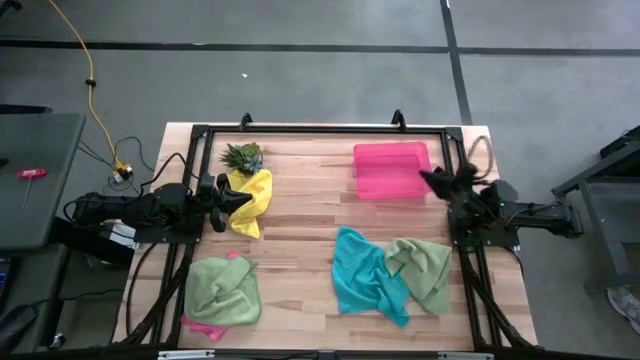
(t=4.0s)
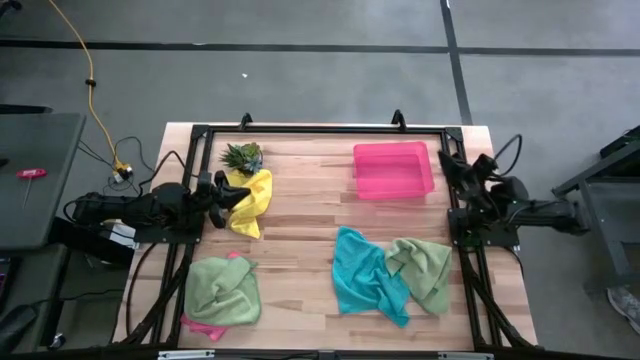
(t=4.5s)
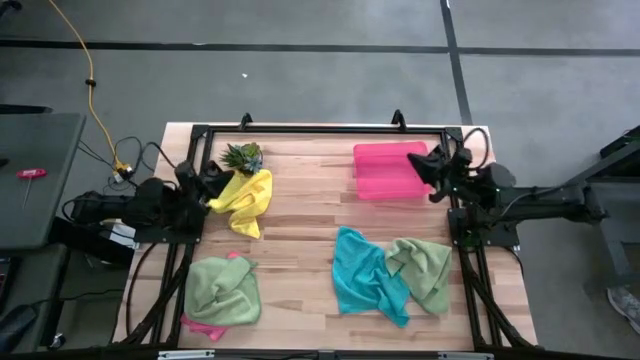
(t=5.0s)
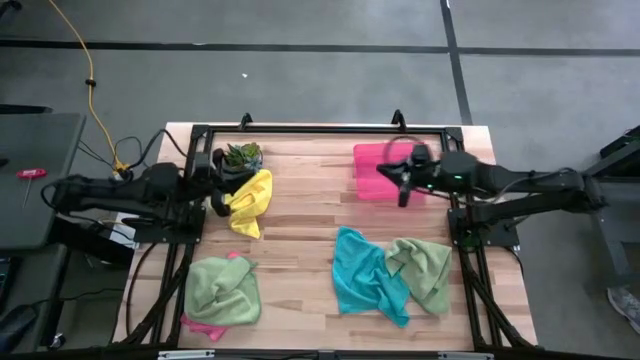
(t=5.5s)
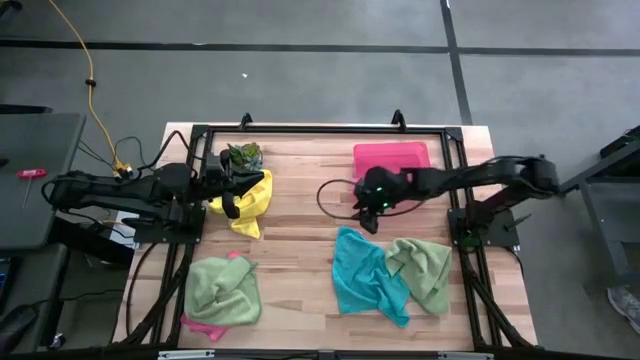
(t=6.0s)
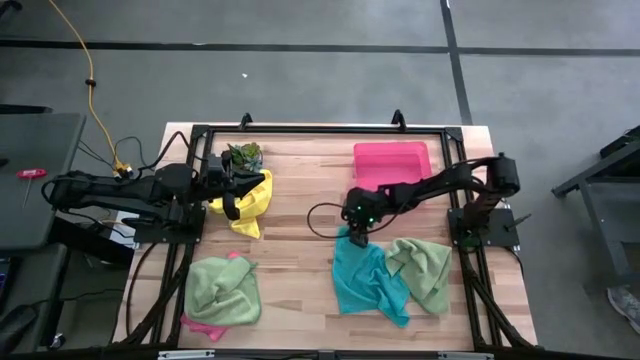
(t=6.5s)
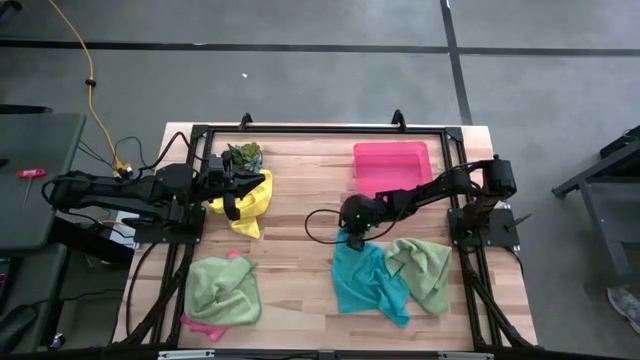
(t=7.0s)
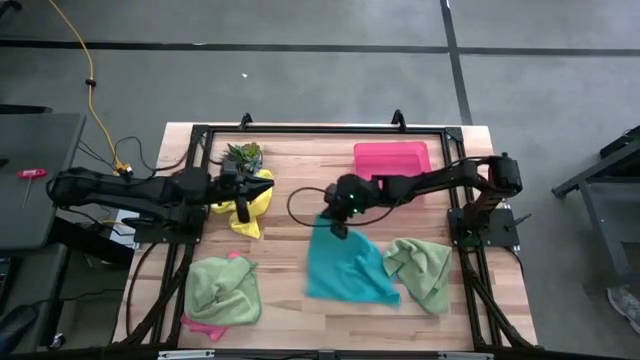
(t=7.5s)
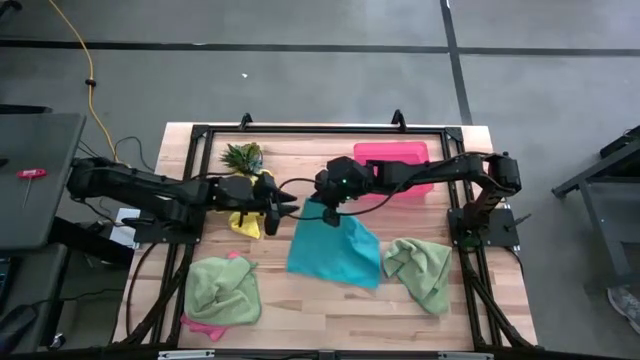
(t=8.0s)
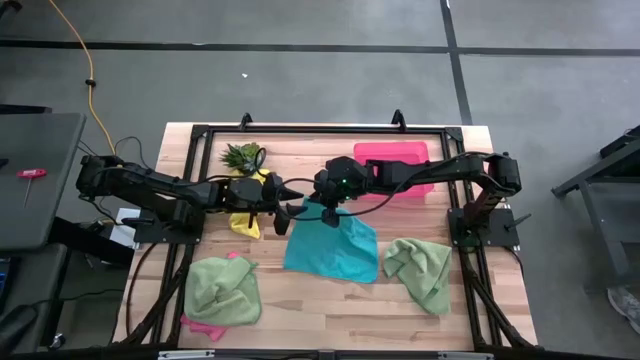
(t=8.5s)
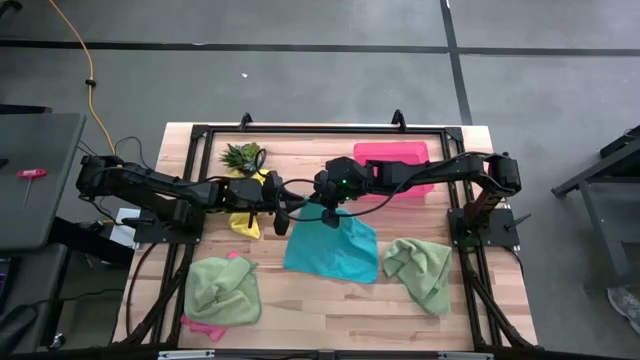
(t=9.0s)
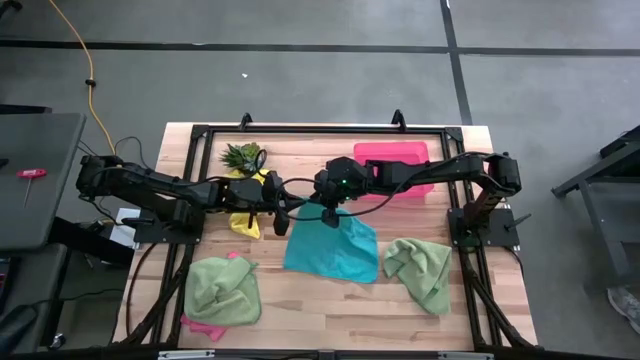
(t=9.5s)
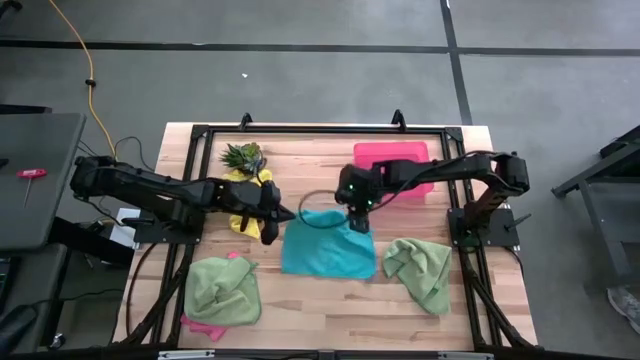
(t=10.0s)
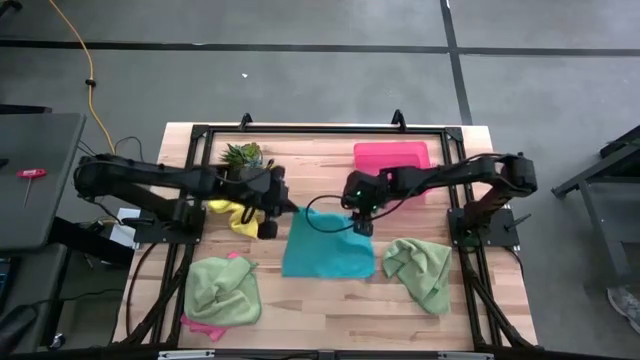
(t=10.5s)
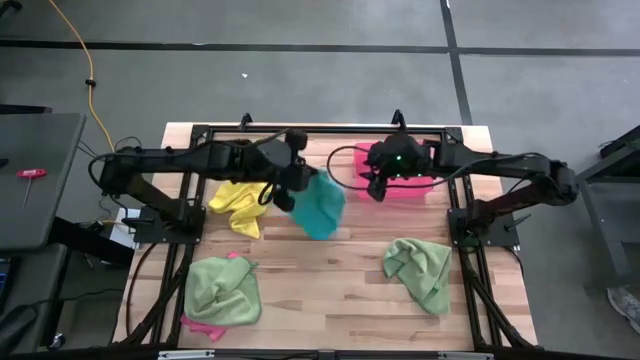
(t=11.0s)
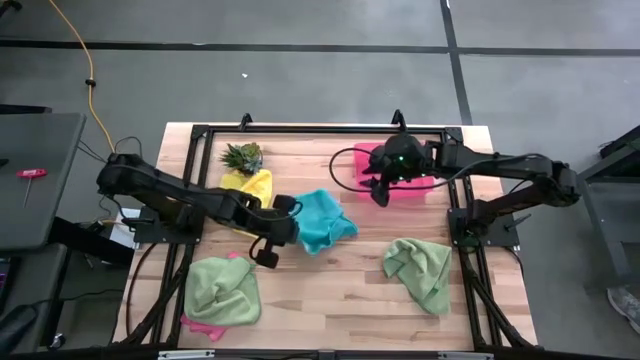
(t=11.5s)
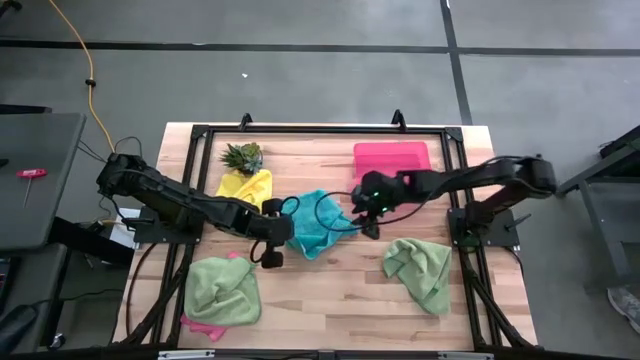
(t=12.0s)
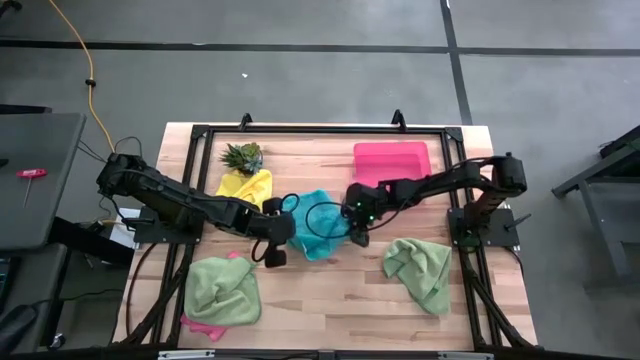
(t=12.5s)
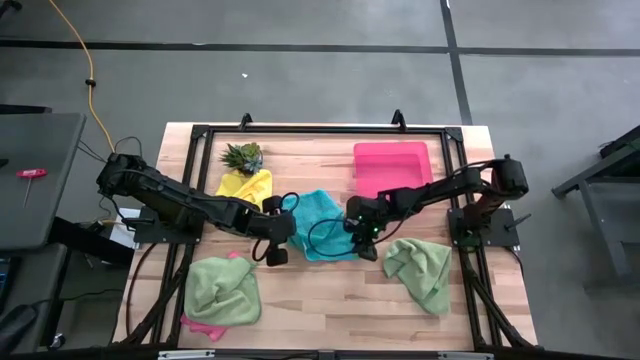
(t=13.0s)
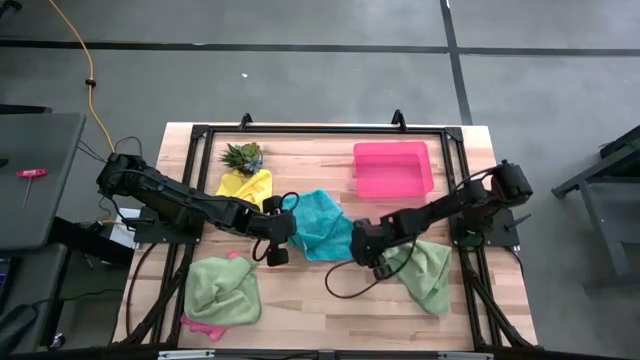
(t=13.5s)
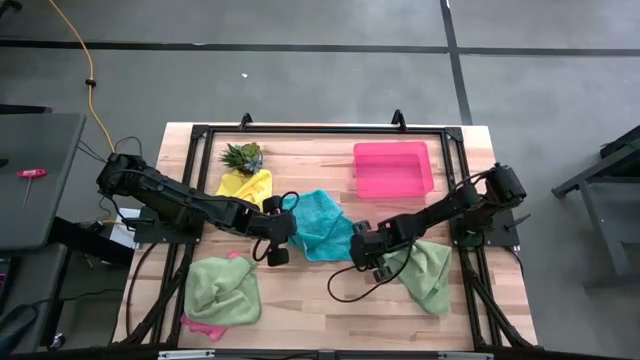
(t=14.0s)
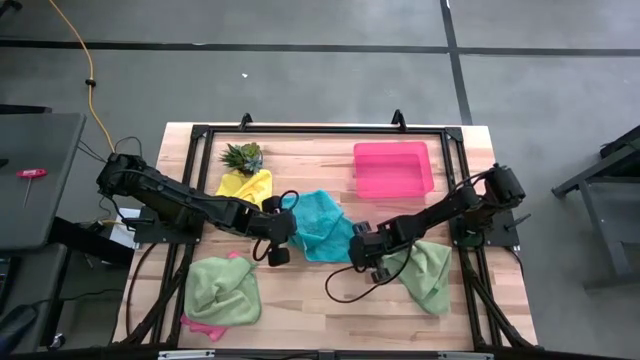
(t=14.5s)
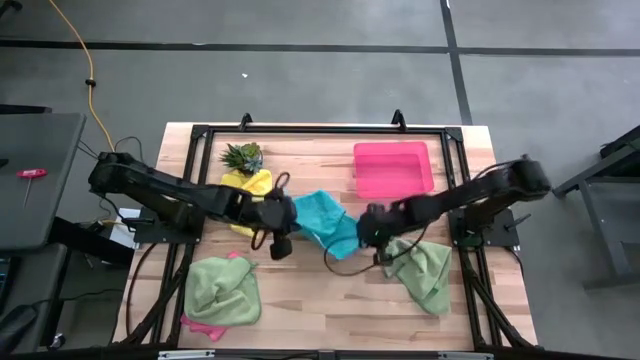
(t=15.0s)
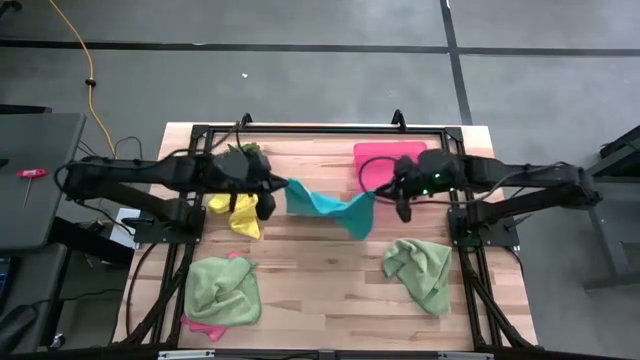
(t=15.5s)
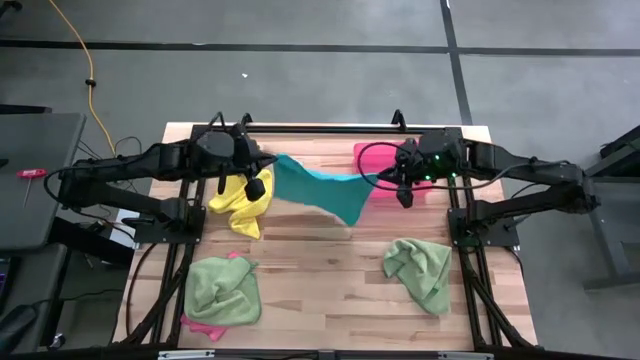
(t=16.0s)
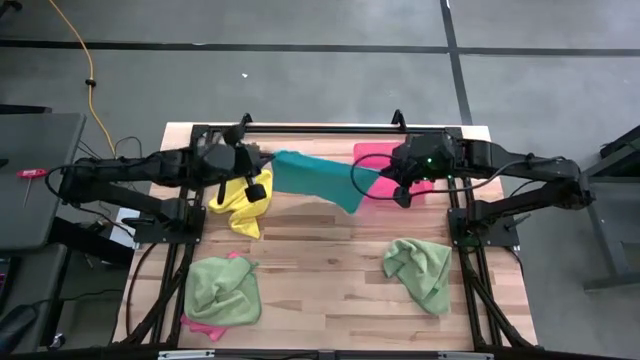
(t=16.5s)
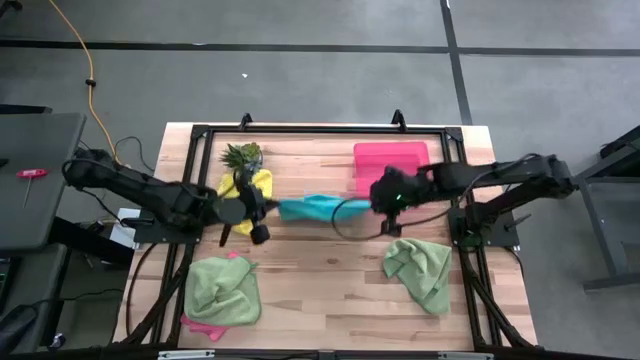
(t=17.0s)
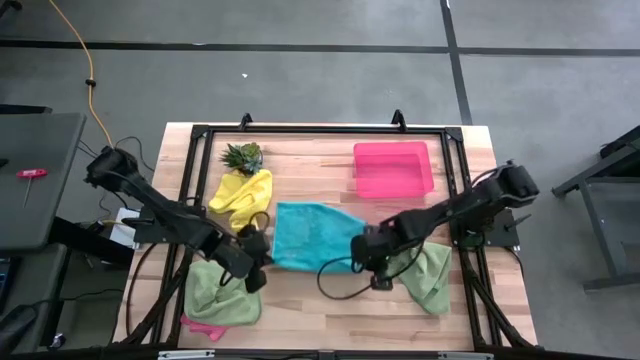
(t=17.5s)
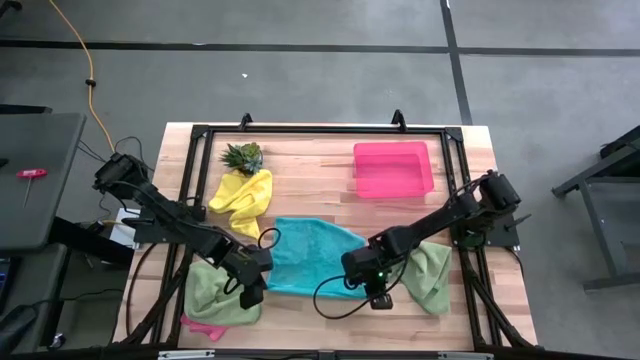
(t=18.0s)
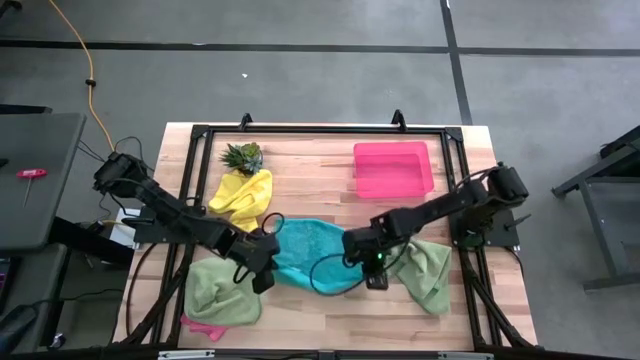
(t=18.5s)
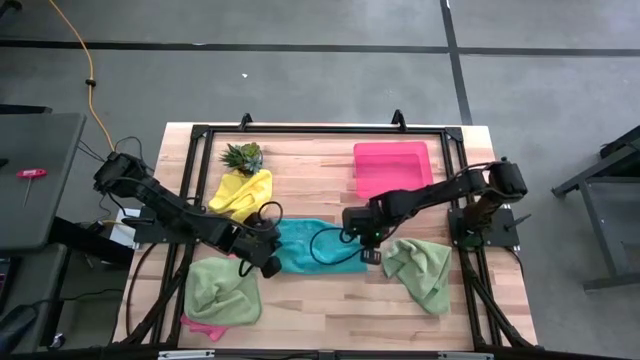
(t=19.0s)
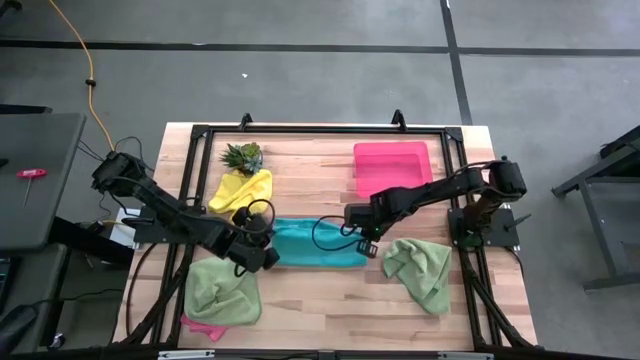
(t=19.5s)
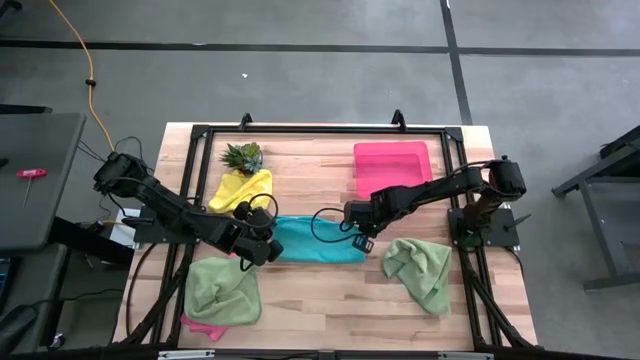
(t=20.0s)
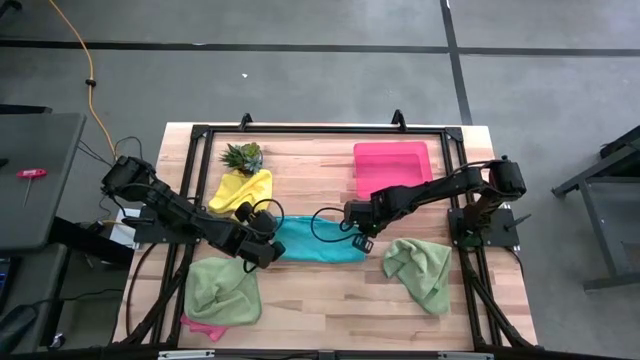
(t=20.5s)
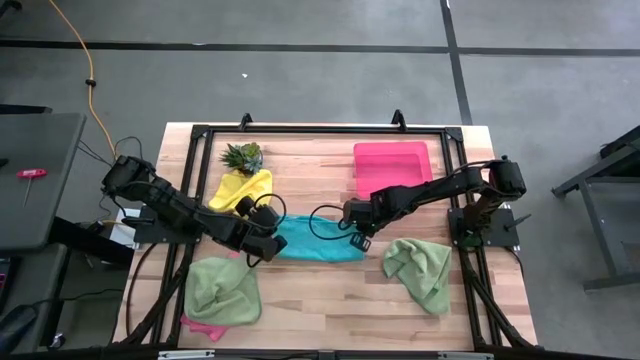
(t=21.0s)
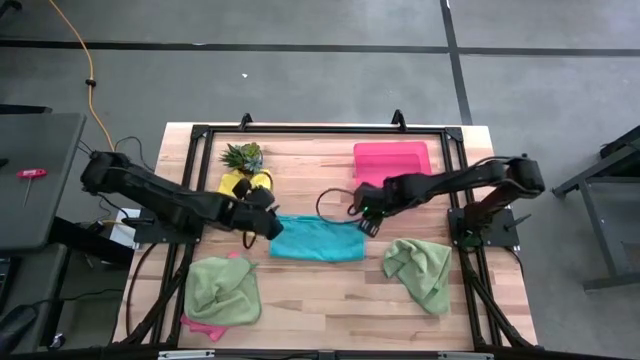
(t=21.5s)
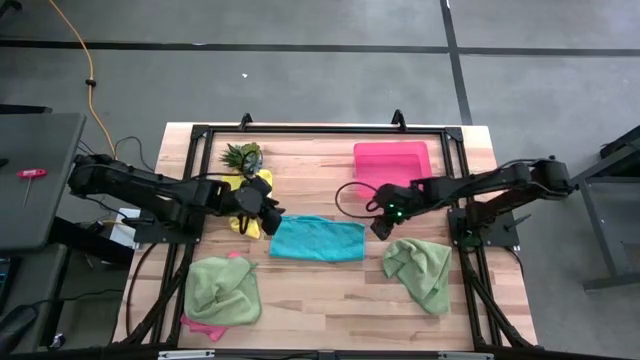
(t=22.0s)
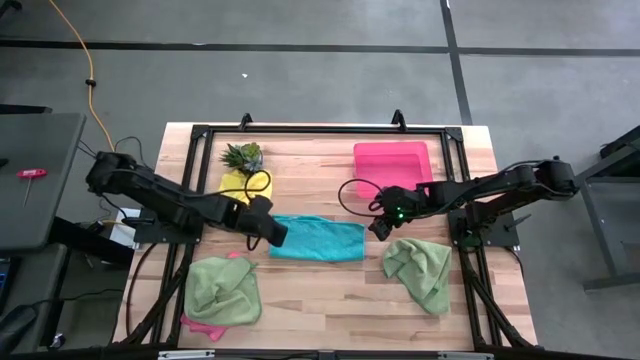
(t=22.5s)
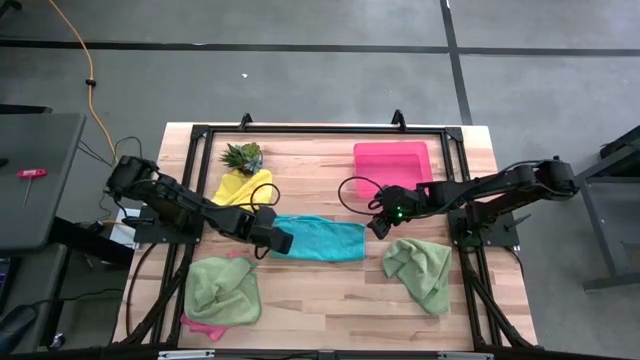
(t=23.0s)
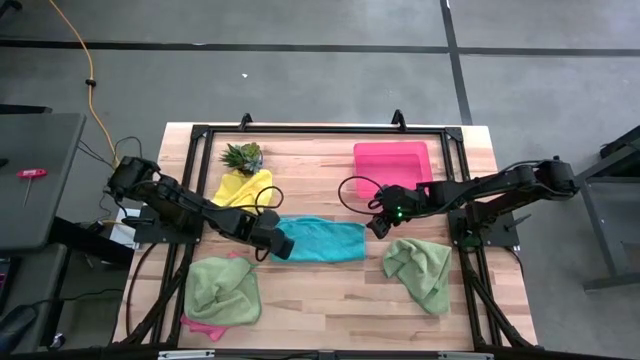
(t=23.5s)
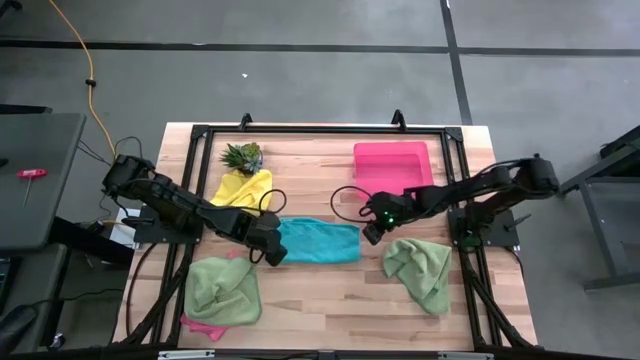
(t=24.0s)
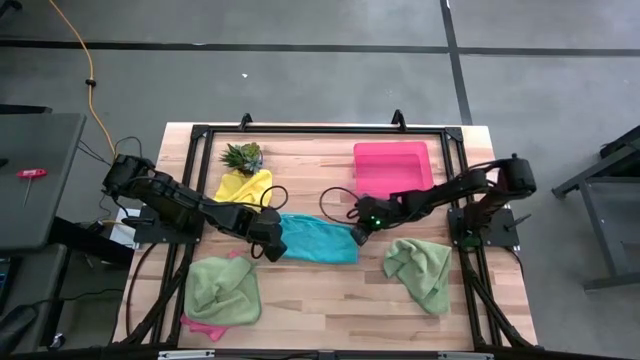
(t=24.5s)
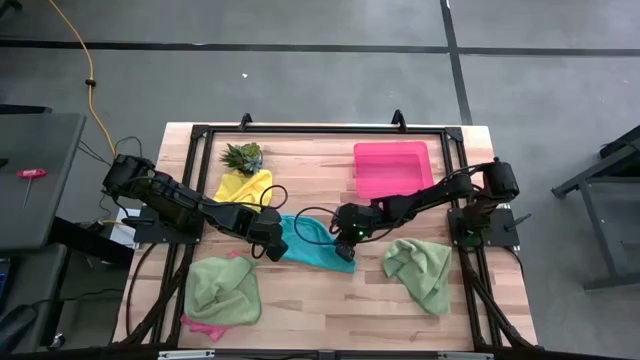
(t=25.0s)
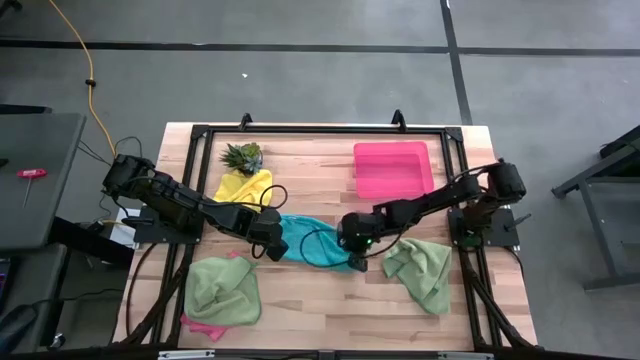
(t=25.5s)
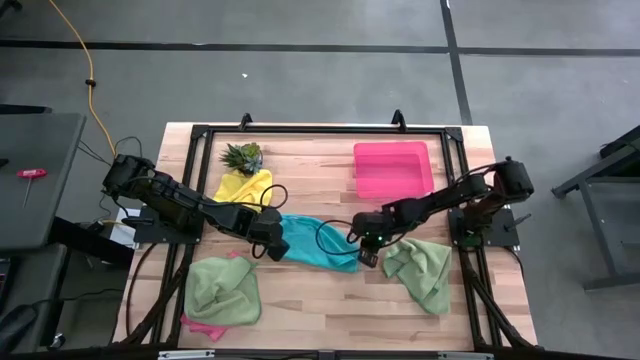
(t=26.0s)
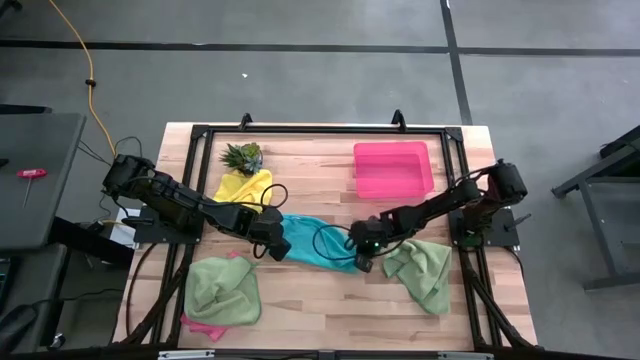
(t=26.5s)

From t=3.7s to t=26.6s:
Task: Fold microfiber towels
Fold the blue microfiber cloth
